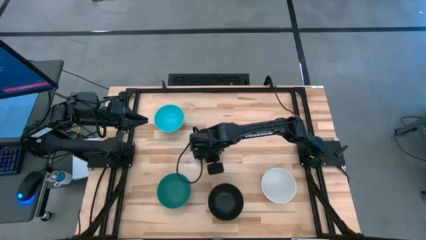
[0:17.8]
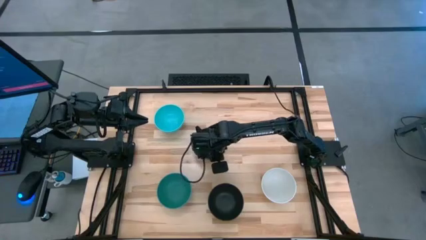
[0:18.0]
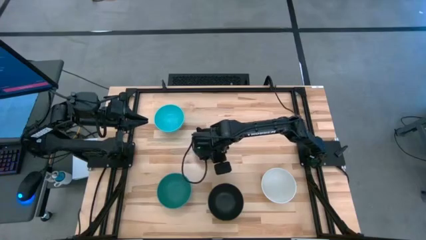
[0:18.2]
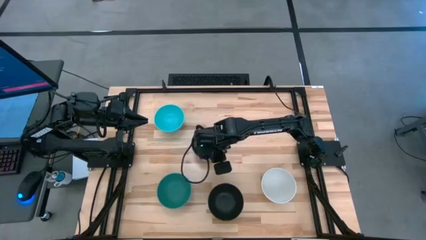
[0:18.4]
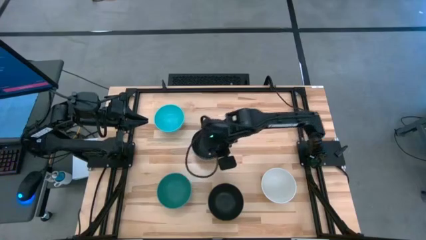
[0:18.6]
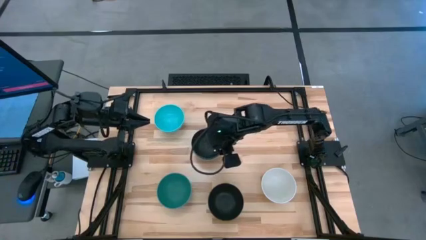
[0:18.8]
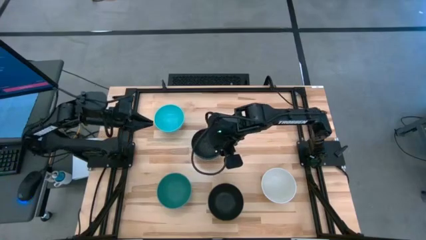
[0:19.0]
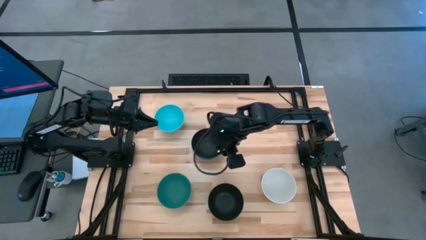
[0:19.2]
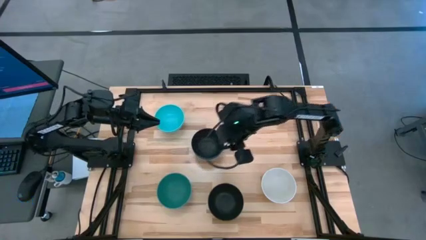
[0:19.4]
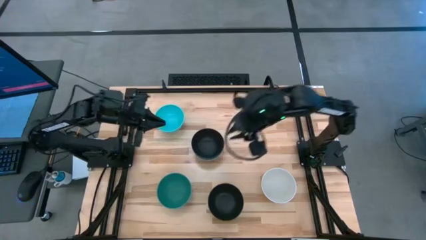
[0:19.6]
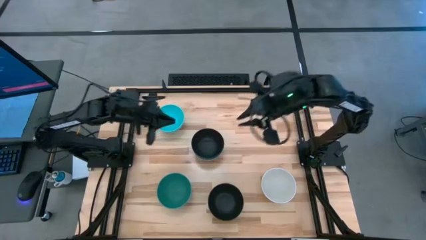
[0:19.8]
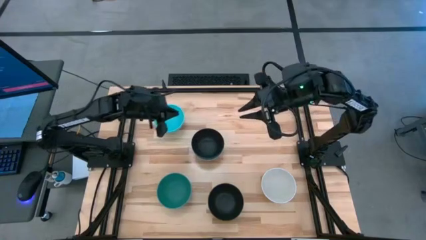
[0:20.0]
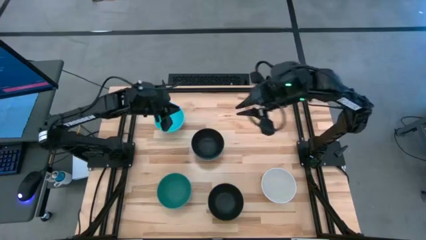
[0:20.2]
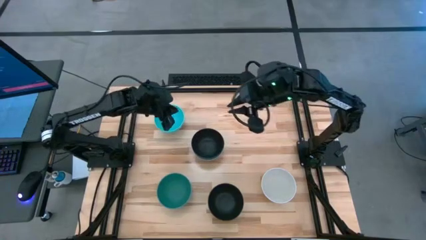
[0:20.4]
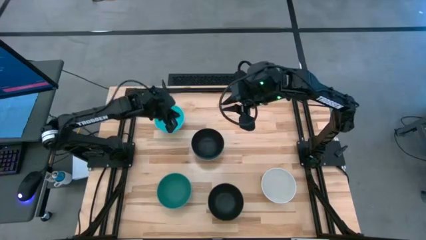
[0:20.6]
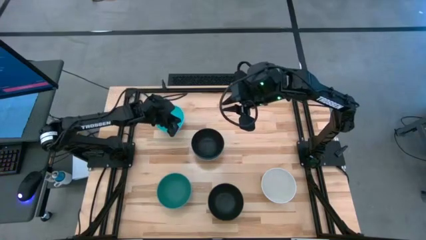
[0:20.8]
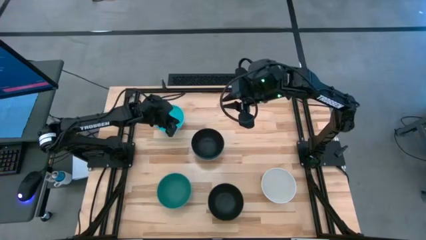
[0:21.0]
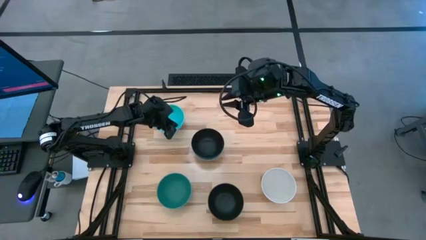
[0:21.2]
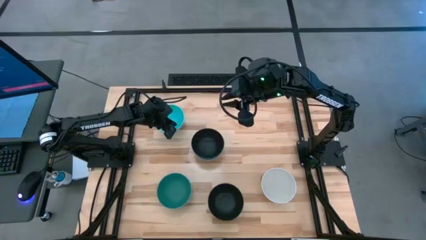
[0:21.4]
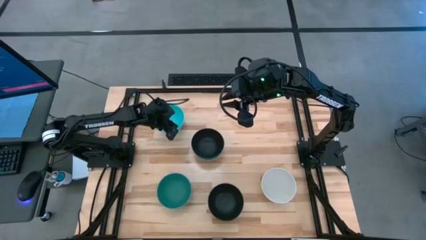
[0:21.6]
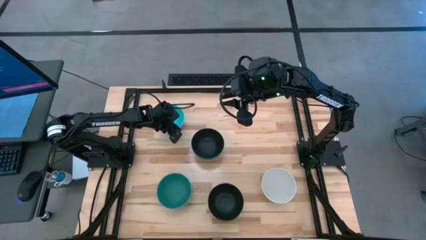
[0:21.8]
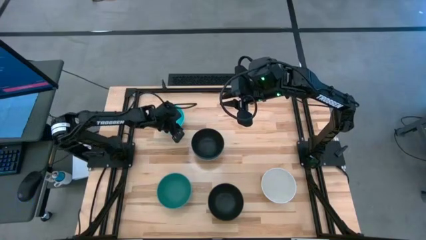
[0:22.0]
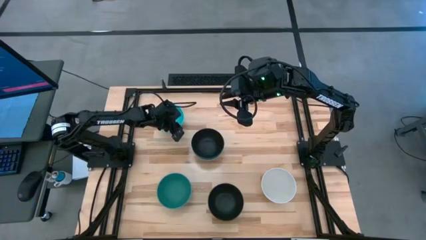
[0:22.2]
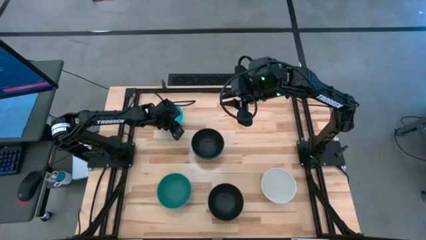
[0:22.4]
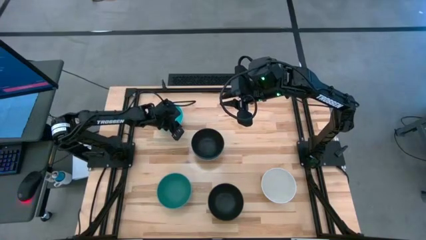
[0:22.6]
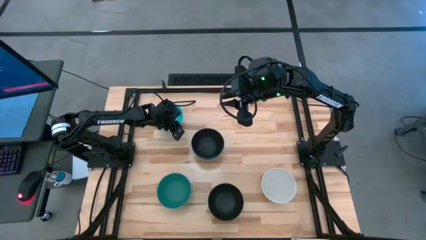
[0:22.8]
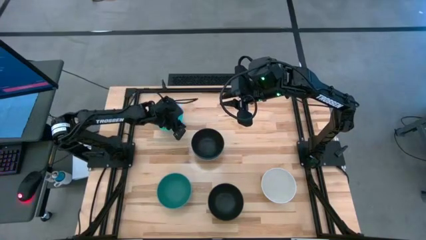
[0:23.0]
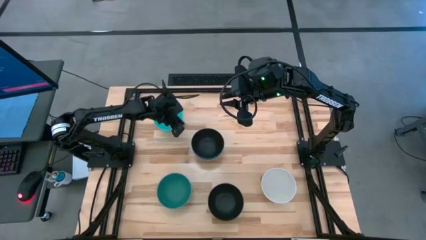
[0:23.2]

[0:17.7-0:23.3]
Task: Nest bowls inside each other
Stack the light blue bowl on top of the black bowl

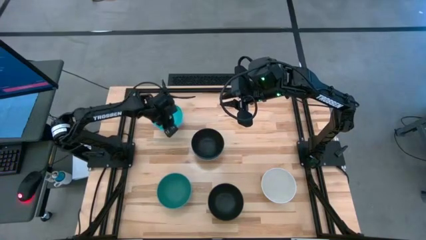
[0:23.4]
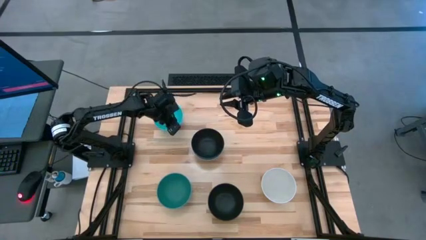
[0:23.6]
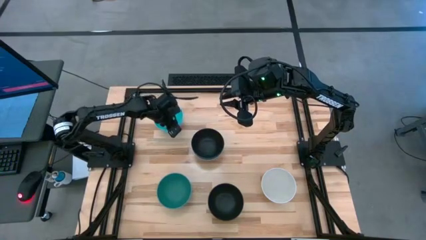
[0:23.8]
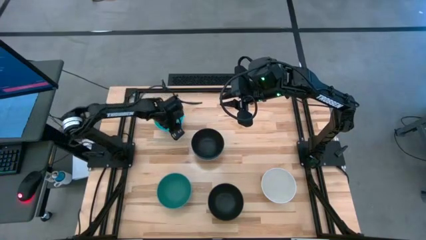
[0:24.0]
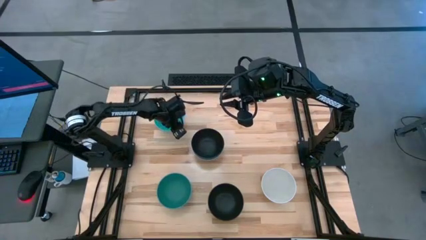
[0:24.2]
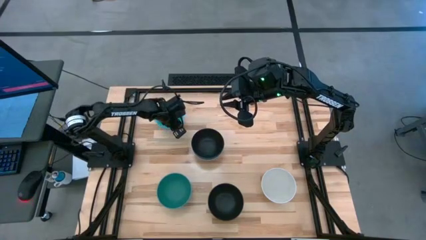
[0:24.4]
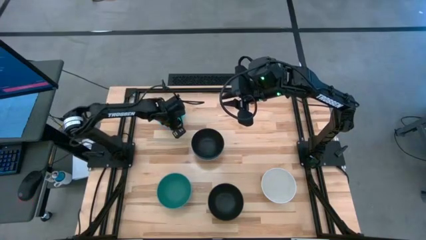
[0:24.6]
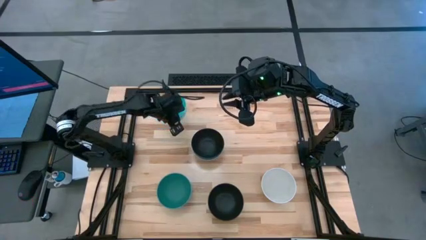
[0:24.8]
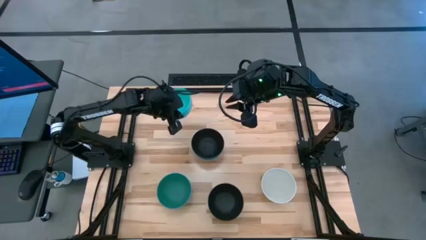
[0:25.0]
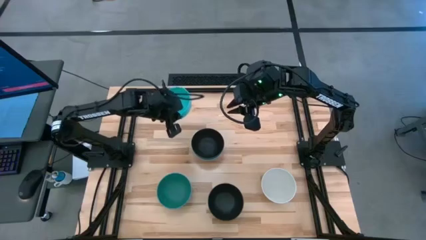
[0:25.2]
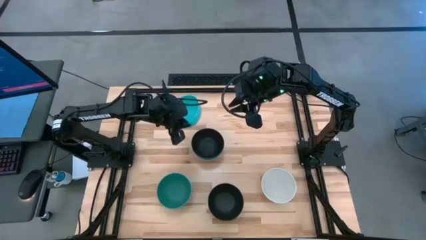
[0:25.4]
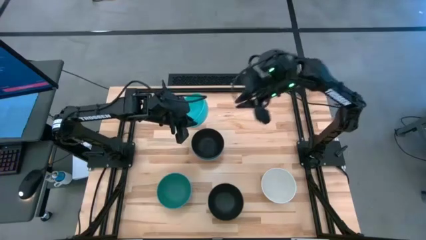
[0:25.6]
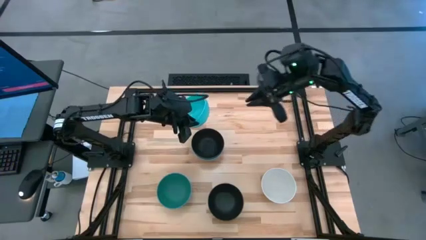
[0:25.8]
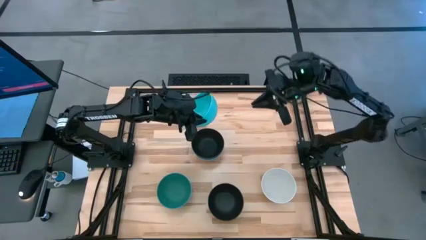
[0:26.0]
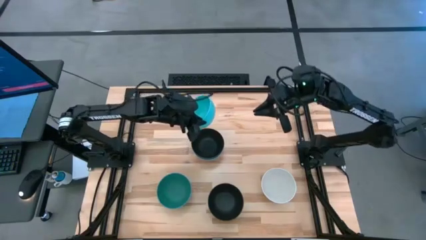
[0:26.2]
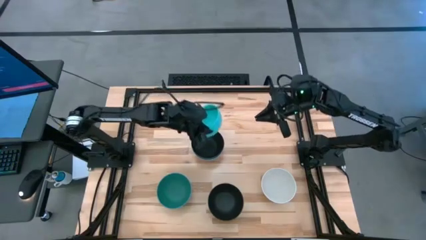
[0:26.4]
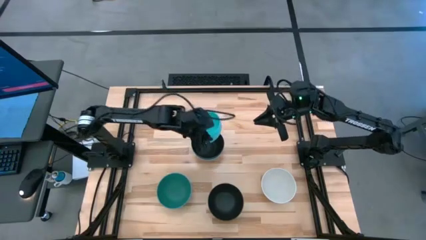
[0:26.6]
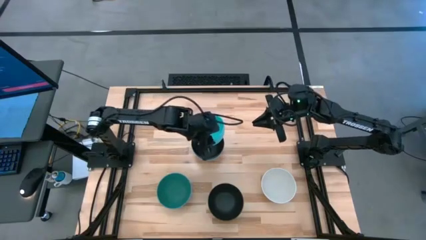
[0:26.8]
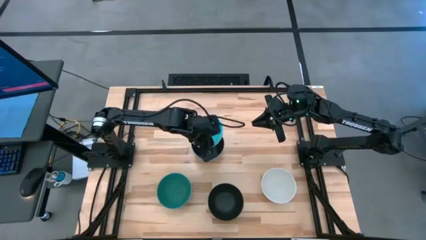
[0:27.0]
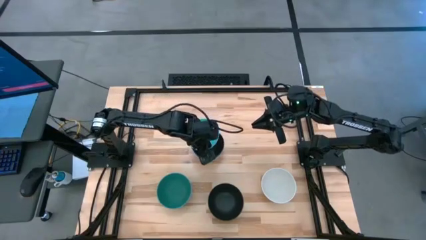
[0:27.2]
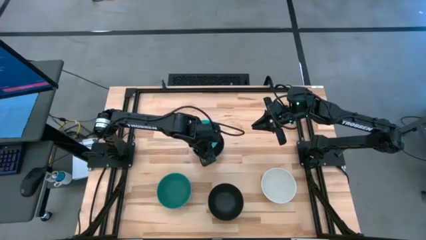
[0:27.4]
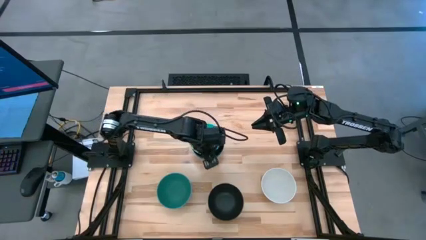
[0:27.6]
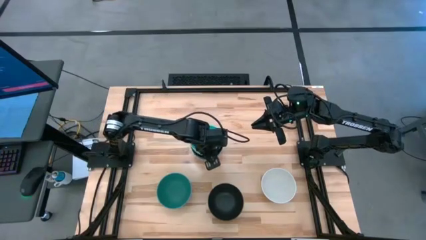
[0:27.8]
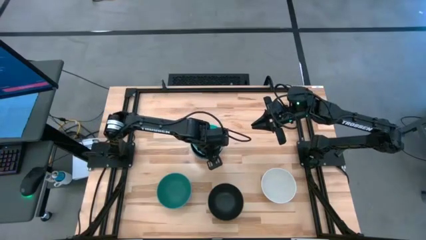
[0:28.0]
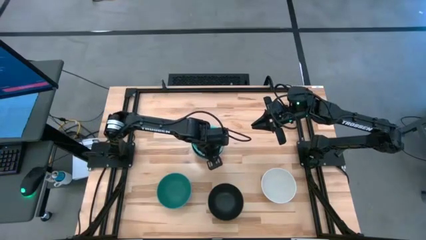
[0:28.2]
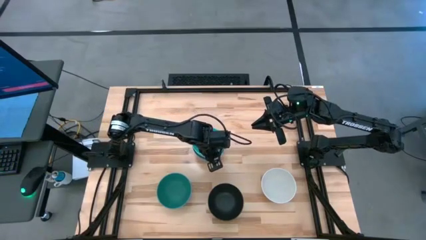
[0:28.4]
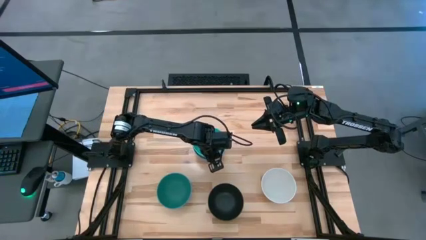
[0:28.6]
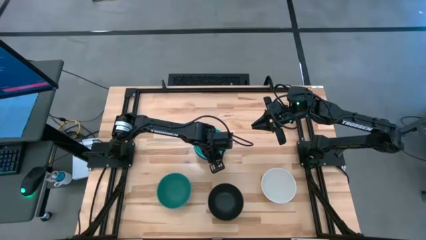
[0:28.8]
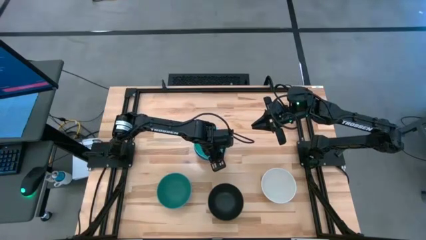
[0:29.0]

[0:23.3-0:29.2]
Stack the light blue bowl on top of the stacked black bowl

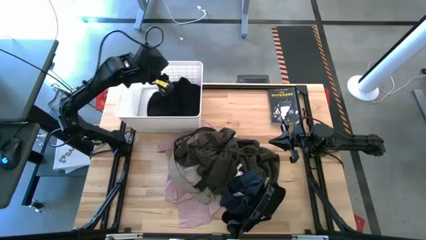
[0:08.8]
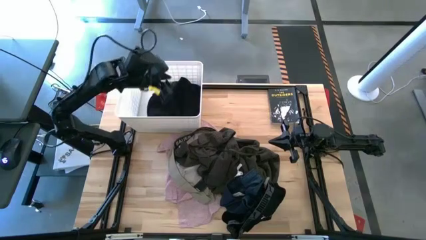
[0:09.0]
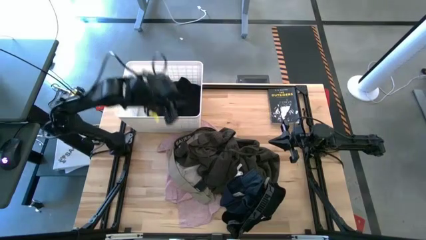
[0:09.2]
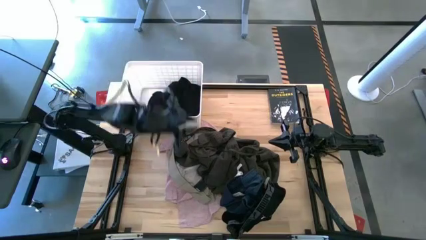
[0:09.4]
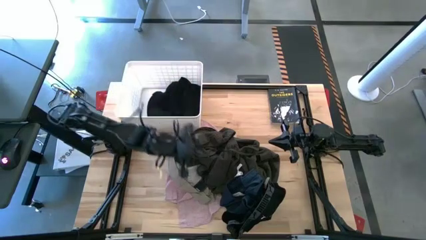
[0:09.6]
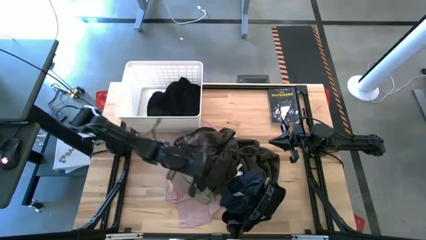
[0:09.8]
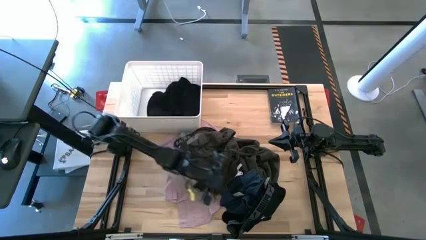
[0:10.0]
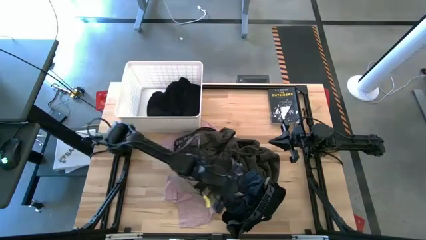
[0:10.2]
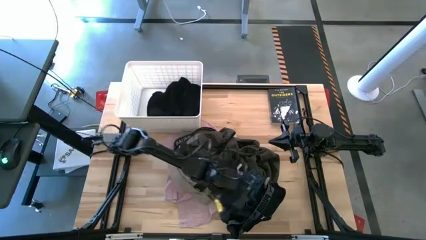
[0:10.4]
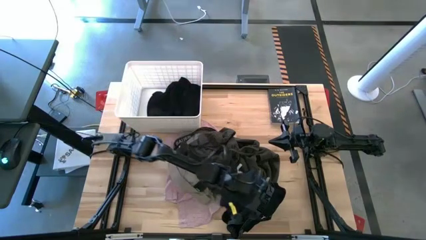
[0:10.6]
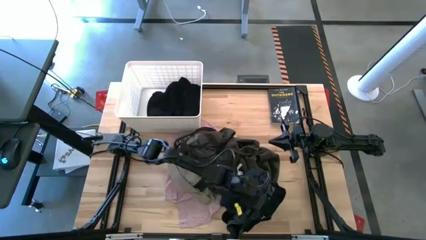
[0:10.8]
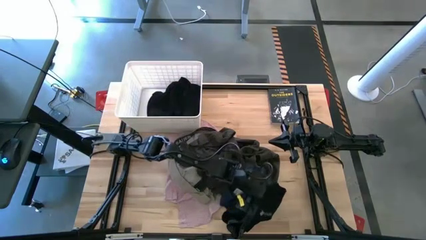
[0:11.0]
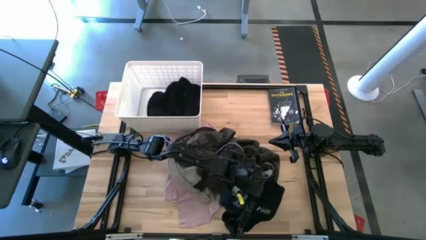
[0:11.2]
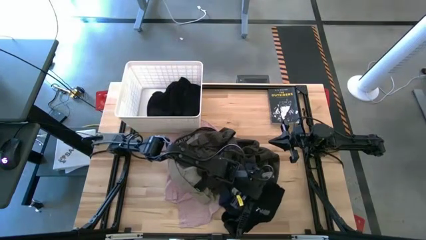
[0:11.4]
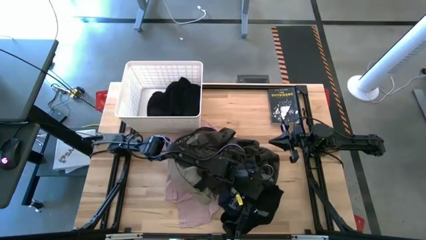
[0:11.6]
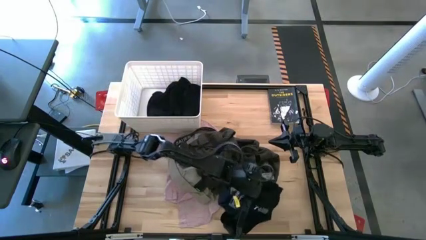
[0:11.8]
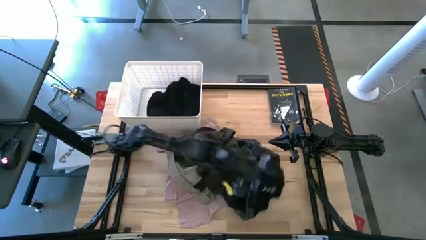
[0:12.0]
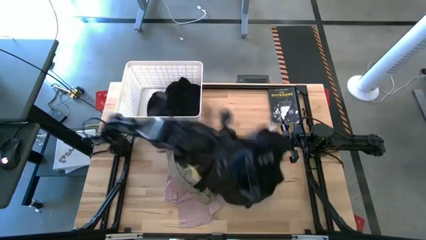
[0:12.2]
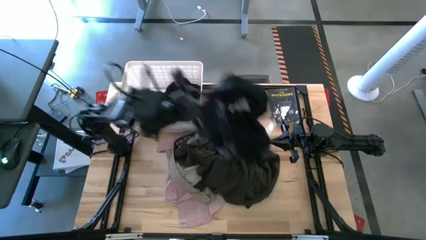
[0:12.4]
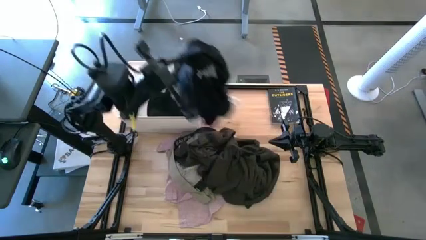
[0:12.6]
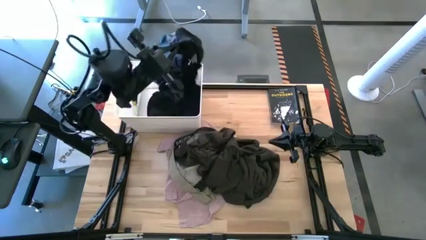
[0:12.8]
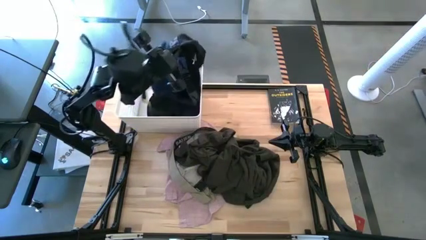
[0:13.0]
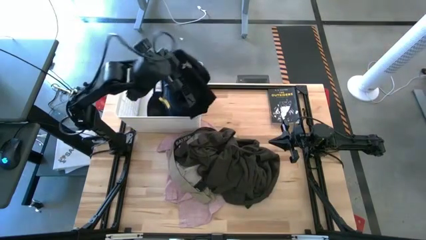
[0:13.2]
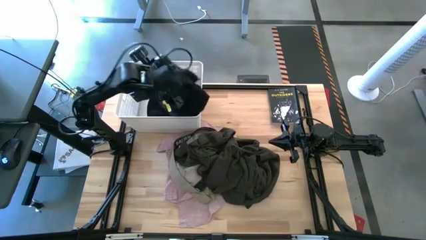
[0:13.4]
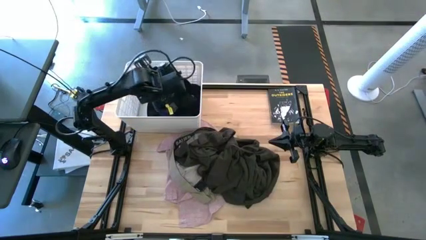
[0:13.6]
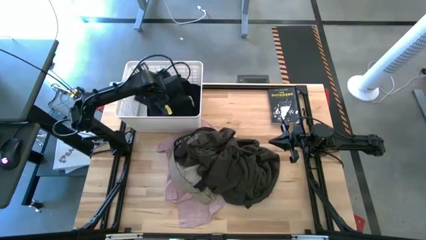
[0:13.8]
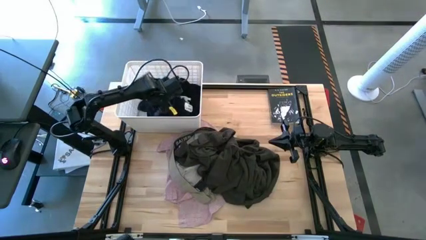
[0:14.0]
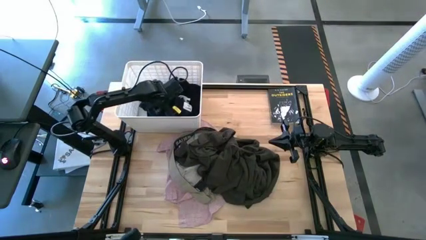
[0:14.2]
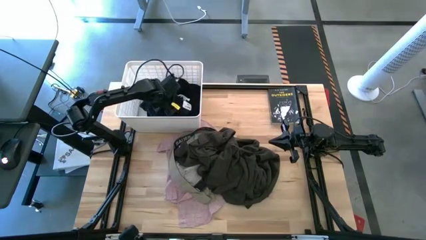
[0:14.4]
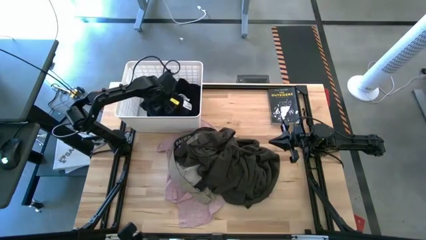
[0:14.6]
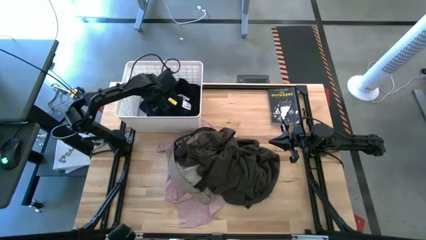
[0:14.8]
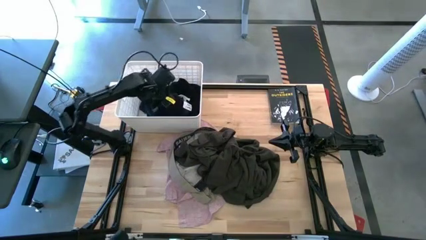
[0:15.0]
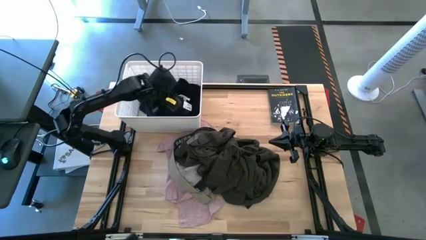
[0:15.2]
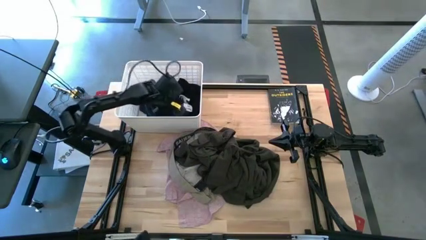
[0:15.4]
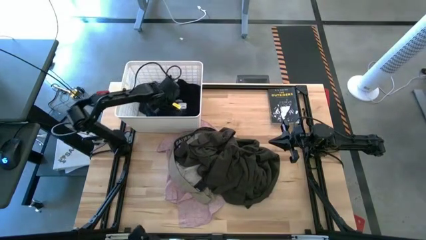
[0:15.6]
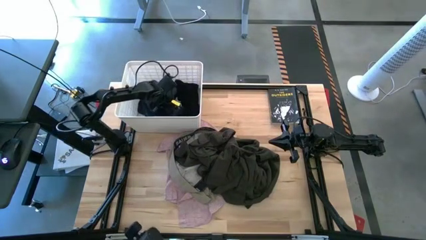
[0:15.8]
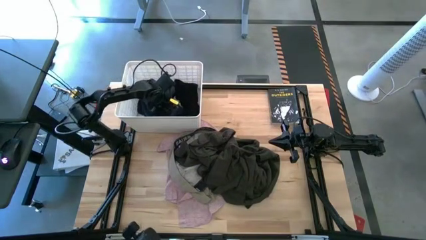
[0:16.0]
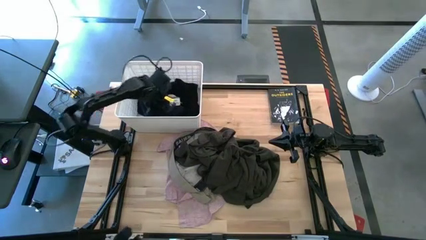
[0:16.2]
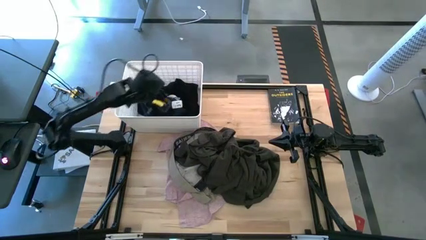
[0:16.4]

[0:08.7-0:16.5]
Task: Sort clothes
Put the black boxer into the white laundry bin
